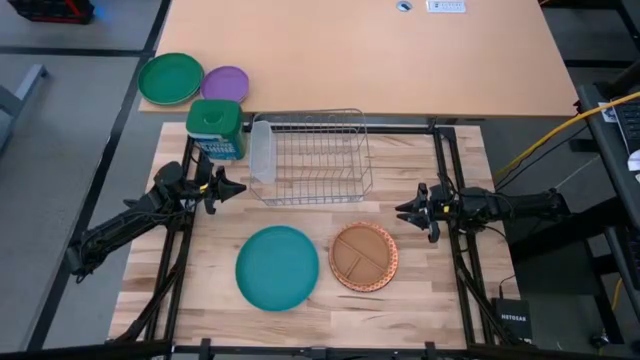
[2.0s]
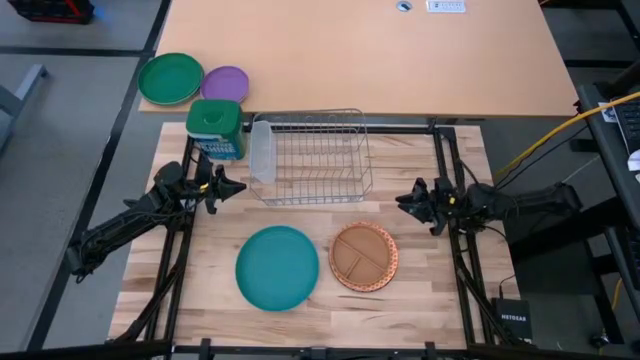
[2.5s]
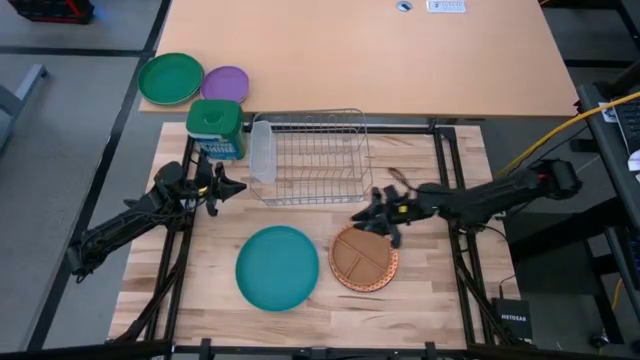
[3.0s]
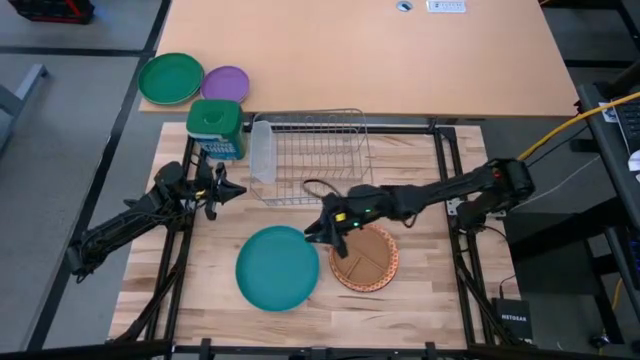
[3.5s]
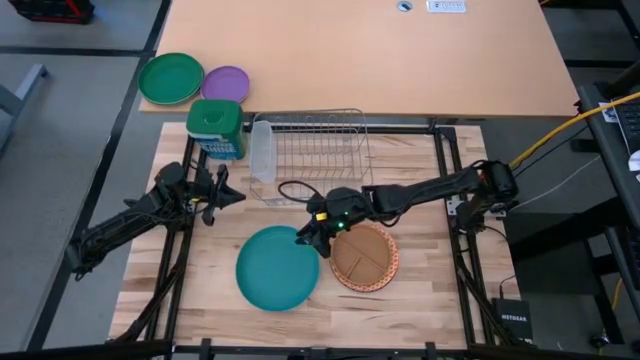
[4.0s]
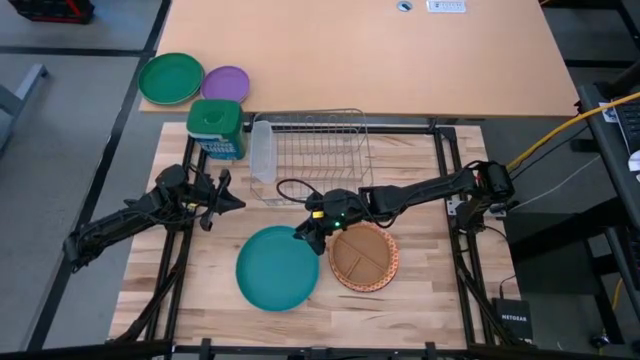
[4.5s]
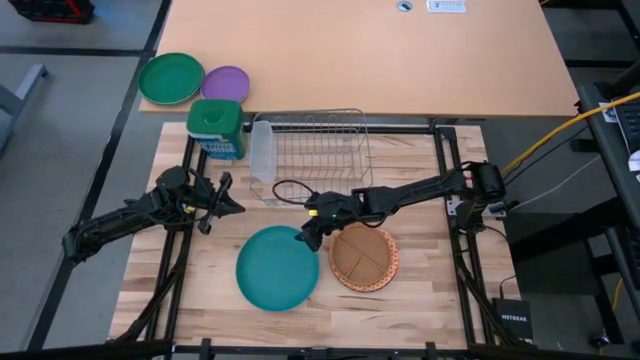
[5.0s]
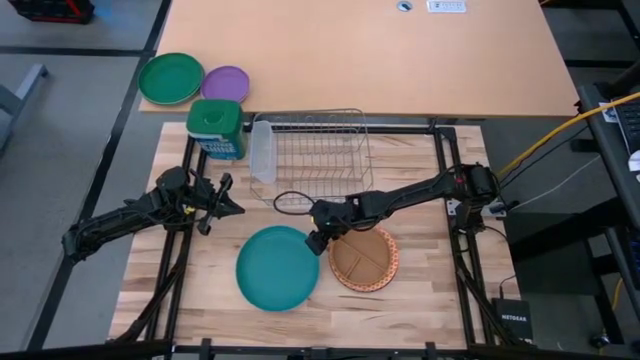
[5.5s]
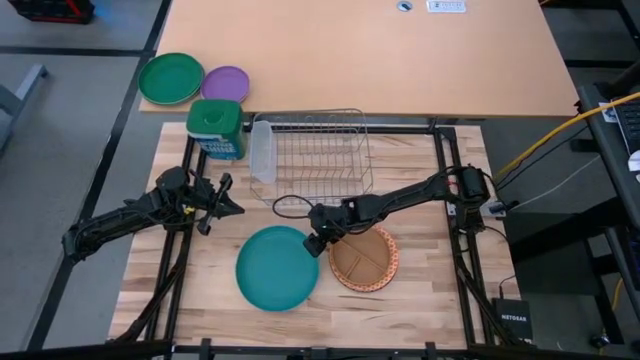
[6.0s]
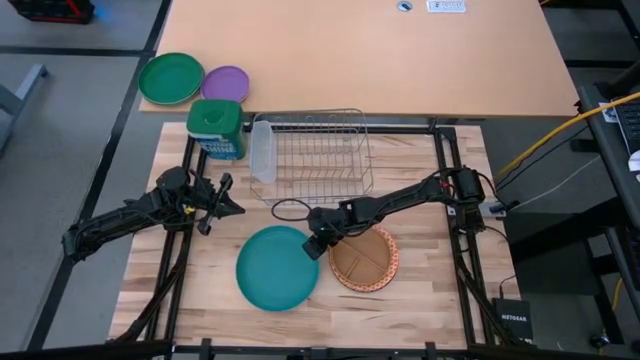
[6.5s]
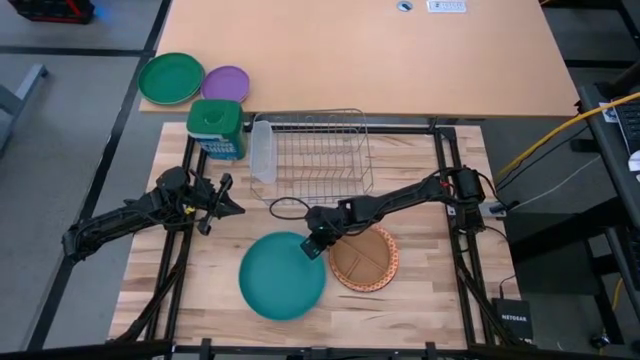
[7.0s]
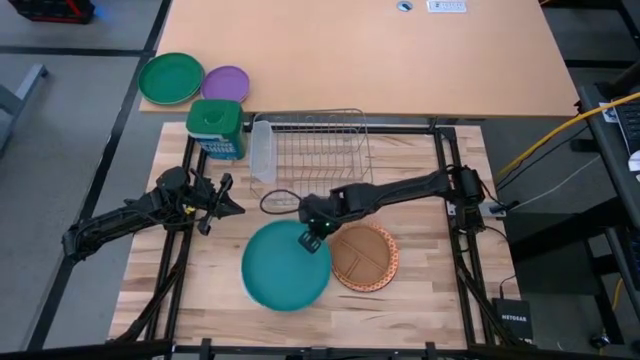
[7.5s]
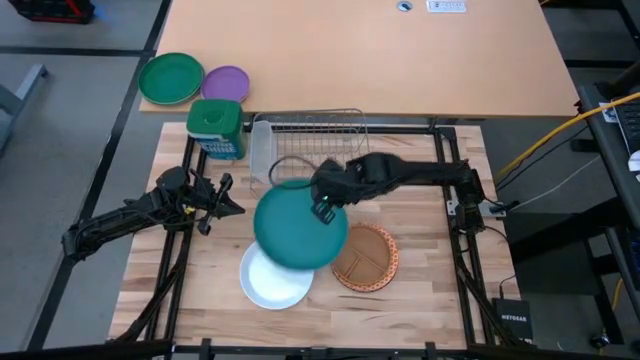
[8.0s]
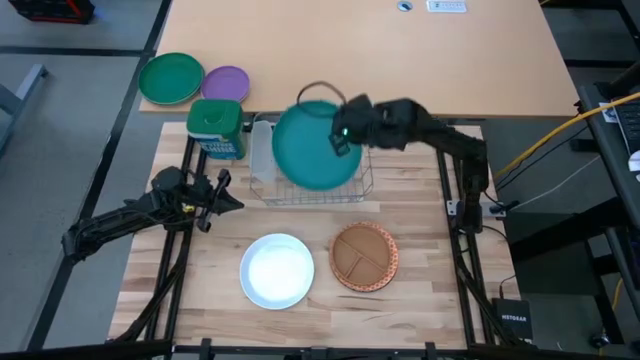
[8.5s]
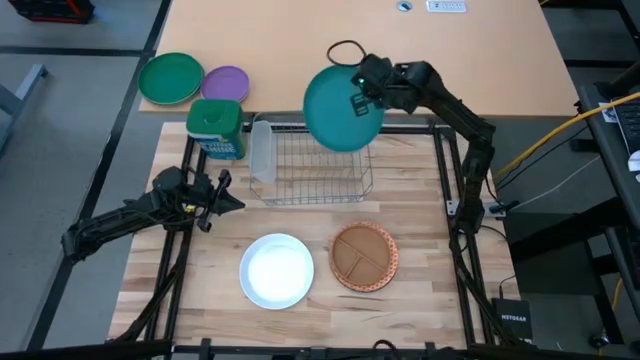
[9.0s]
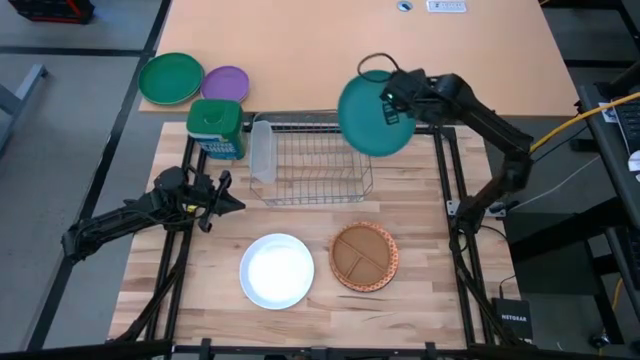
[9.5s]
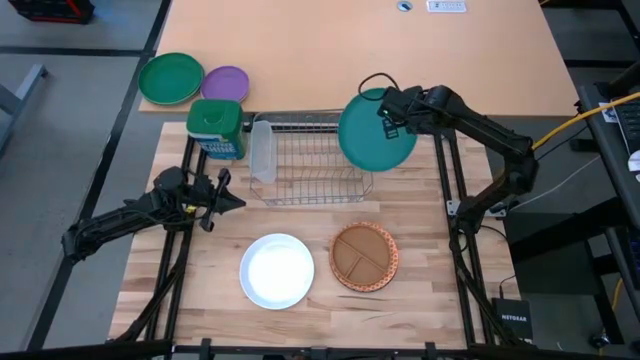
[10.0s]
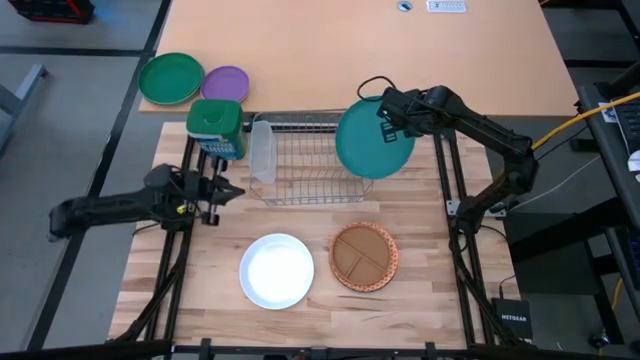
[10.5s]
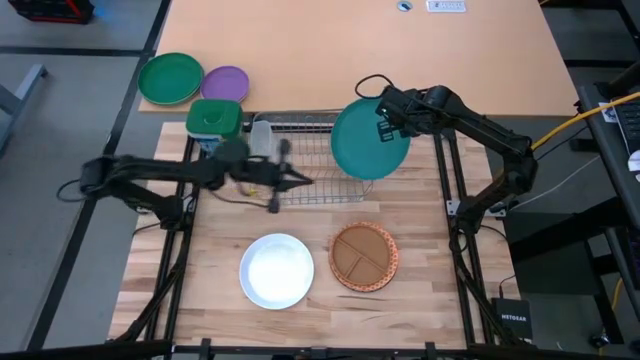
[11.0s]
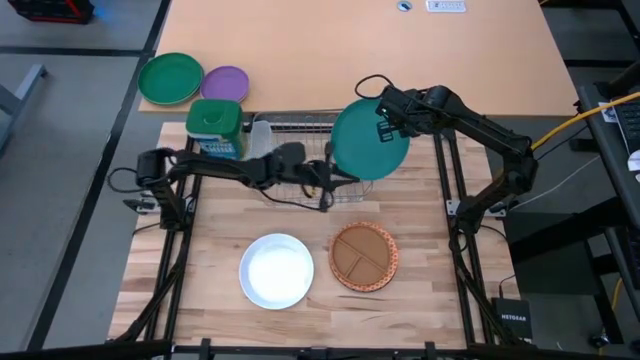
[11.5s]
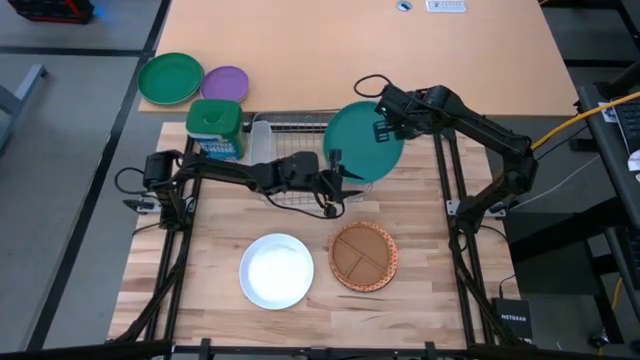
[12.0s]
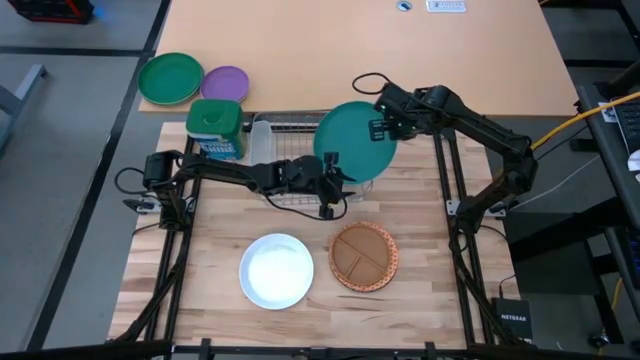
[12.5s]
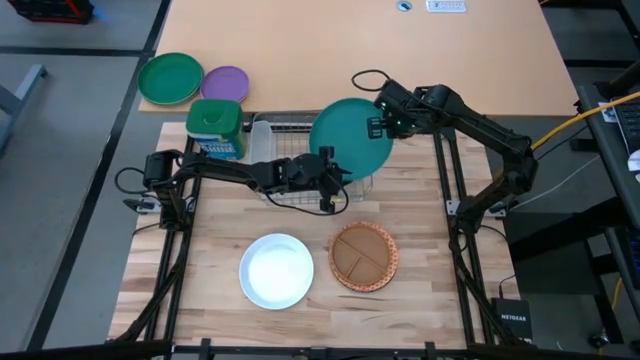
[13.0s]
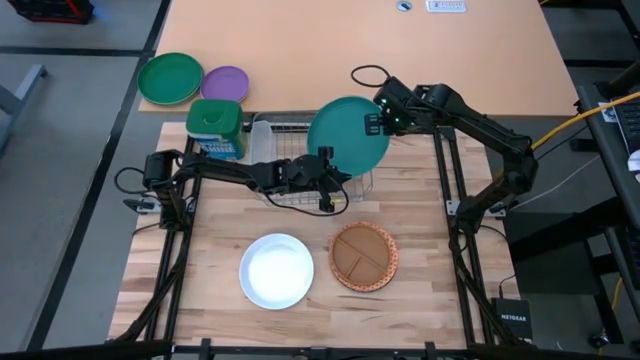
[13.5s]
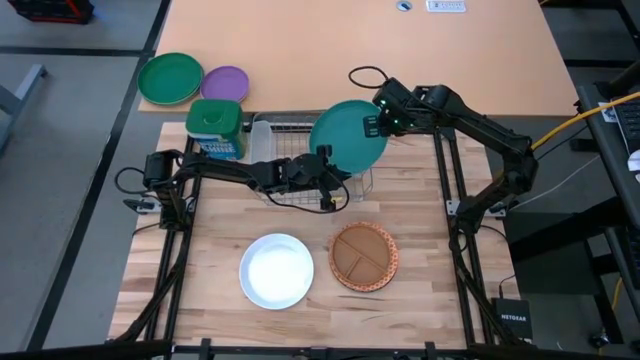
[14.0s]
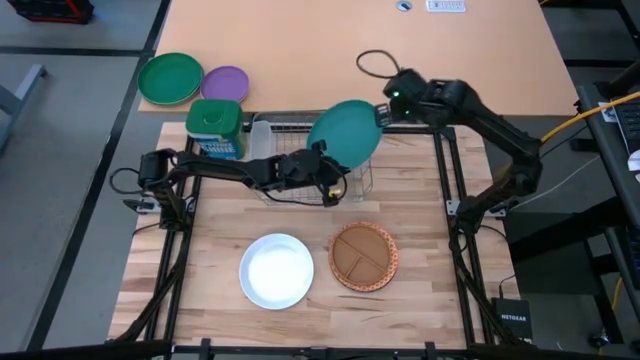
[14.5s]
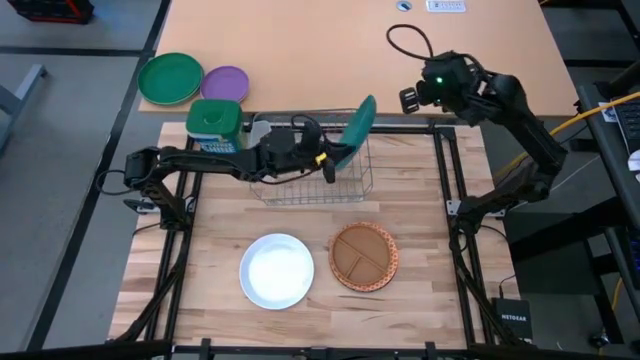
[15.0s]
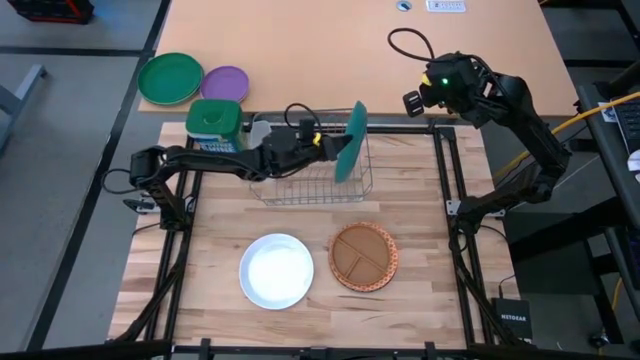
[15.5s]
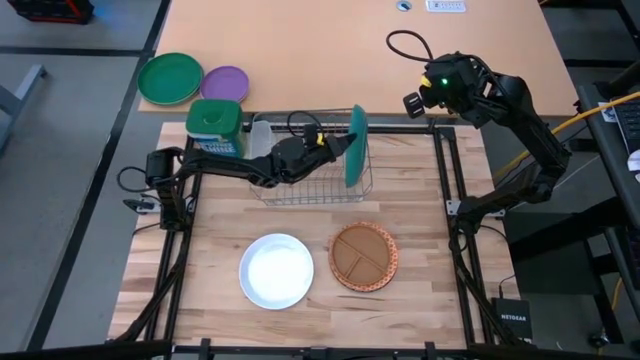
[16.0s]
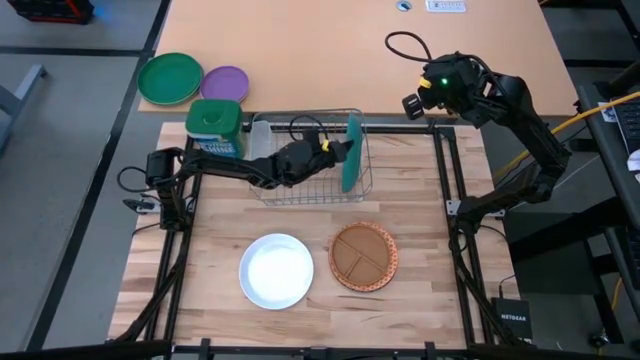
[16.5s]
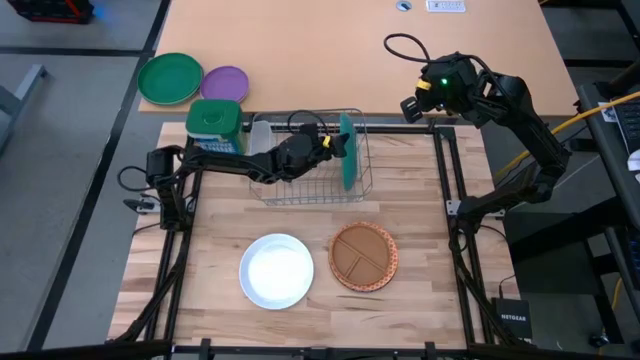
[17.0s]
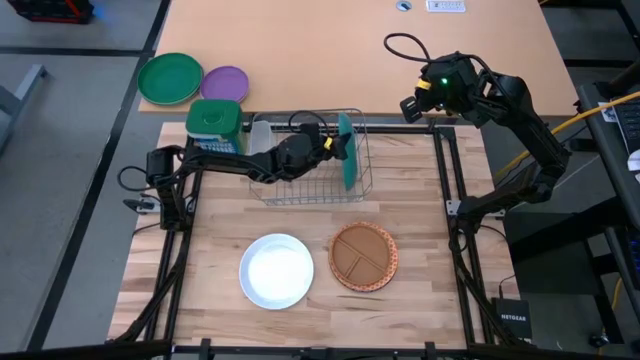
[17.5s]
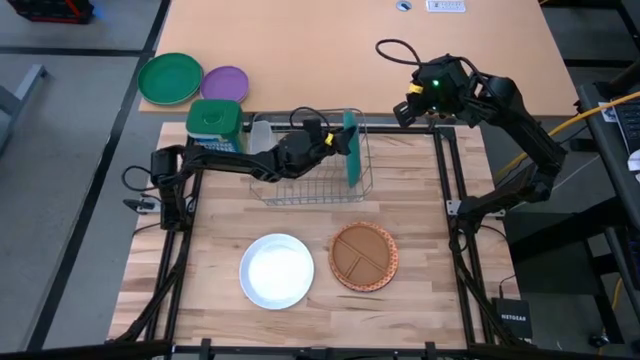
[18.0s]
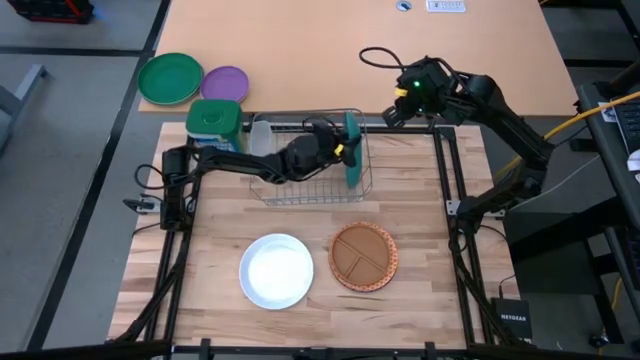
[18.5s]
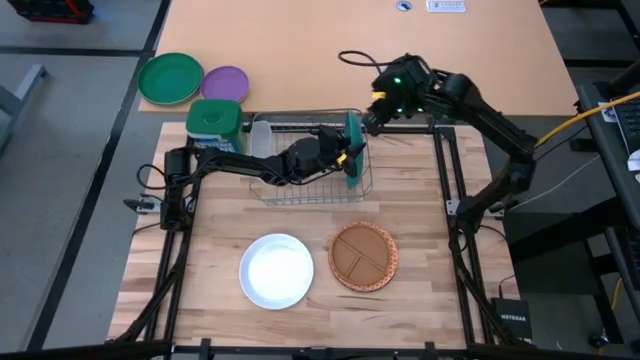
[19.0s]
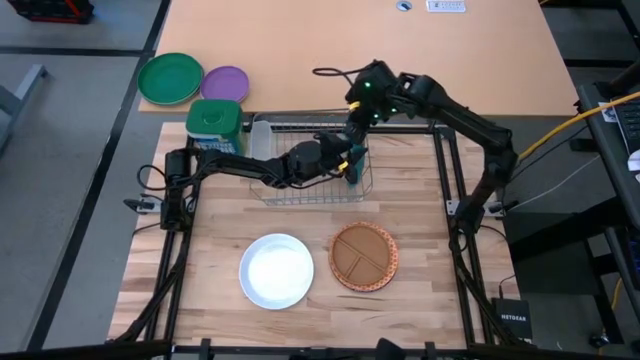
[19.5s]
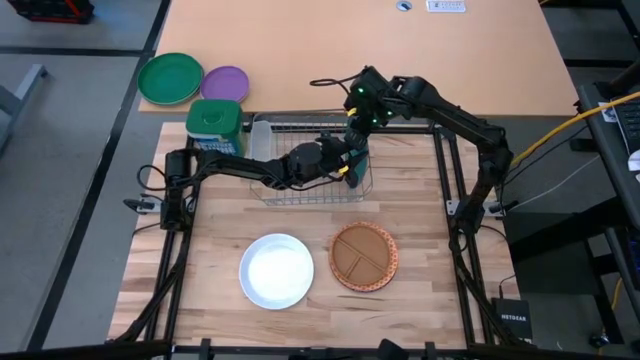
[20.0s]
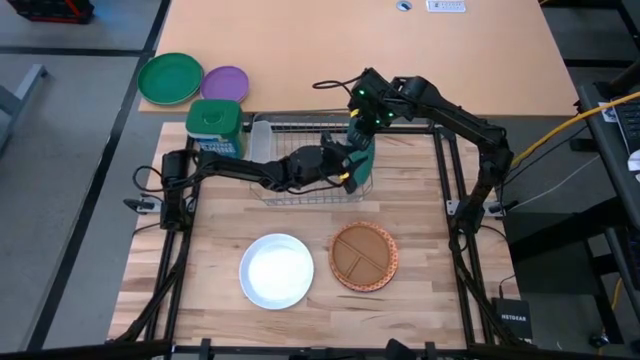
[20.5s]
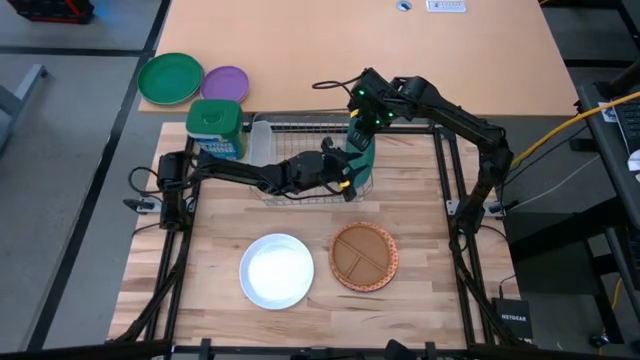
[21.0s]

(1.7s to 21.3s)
Task: Sort dishes
Put the blue plate in the dish rack
